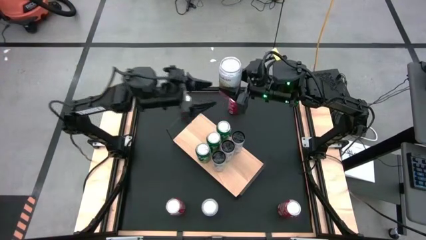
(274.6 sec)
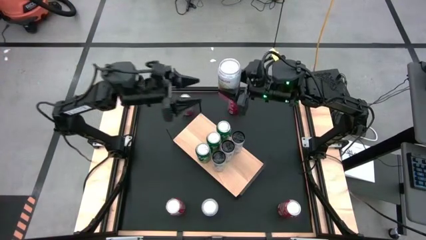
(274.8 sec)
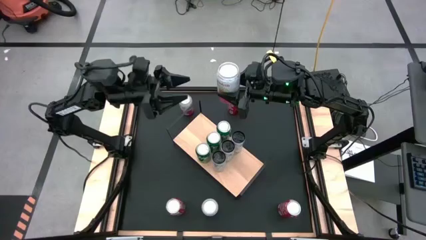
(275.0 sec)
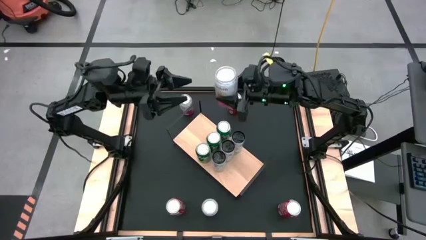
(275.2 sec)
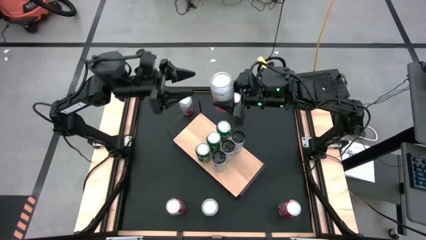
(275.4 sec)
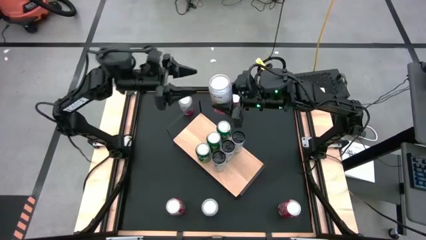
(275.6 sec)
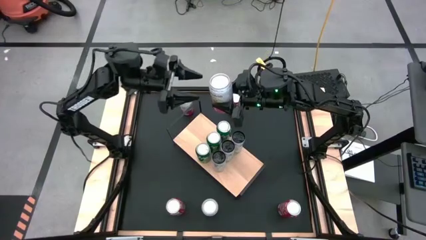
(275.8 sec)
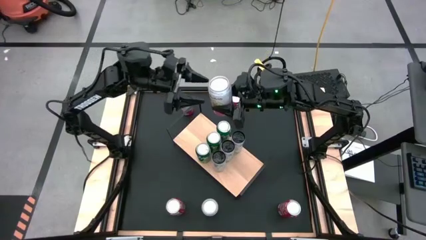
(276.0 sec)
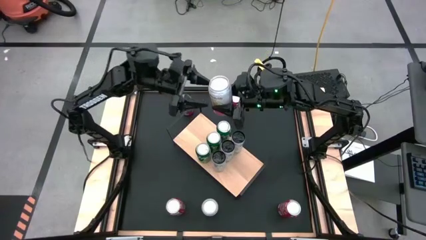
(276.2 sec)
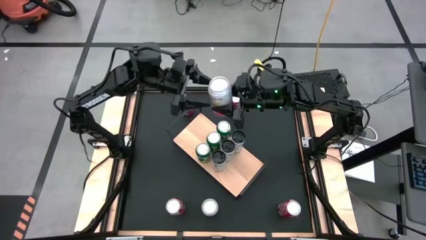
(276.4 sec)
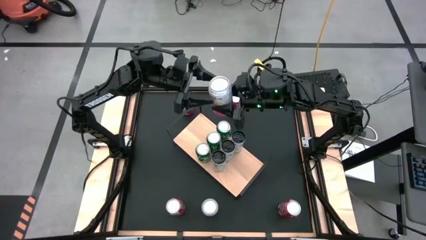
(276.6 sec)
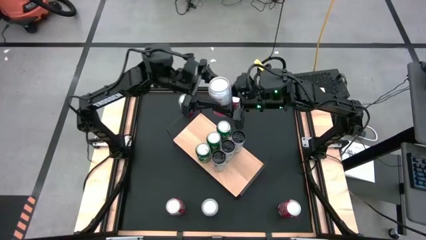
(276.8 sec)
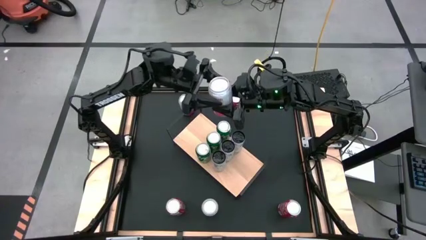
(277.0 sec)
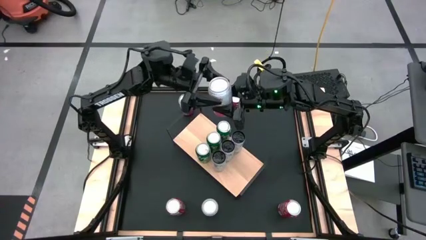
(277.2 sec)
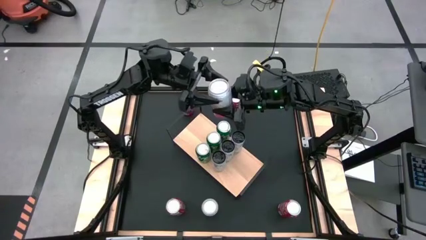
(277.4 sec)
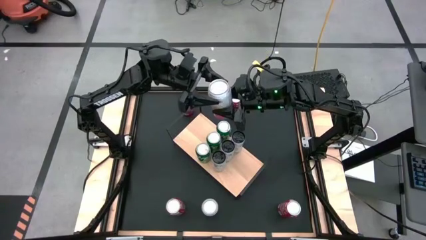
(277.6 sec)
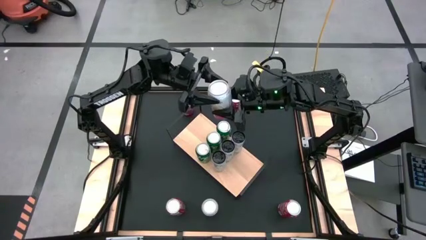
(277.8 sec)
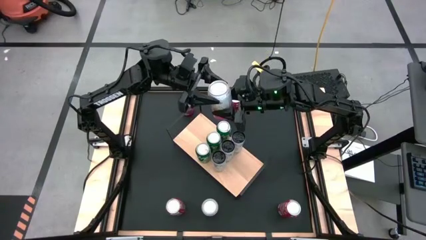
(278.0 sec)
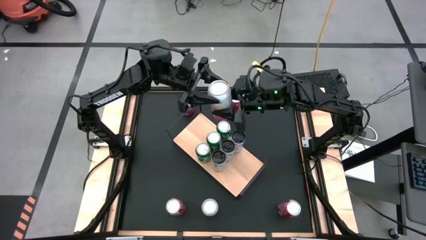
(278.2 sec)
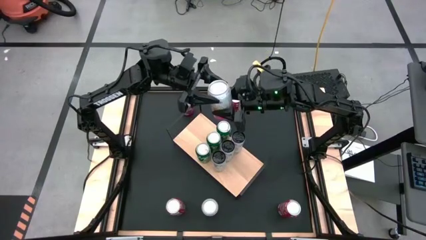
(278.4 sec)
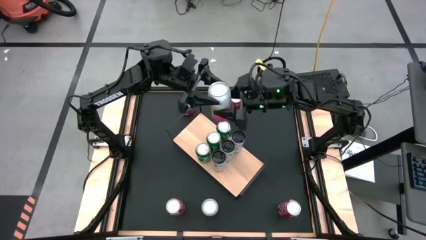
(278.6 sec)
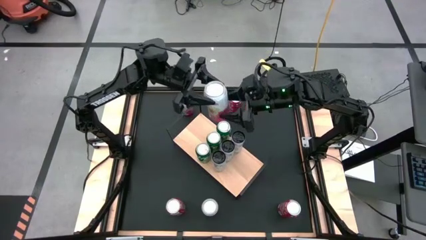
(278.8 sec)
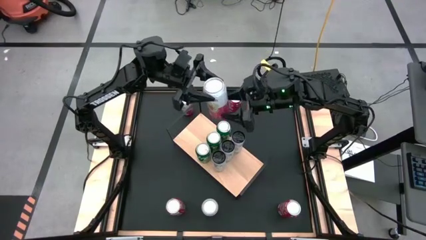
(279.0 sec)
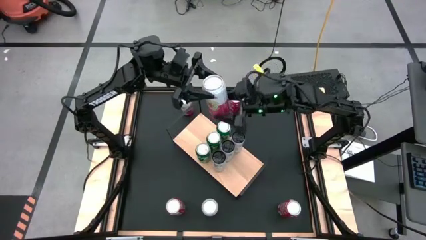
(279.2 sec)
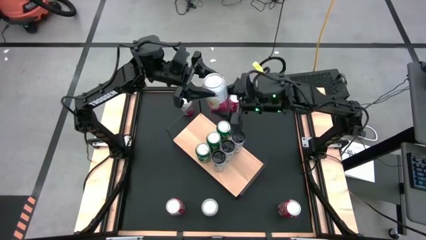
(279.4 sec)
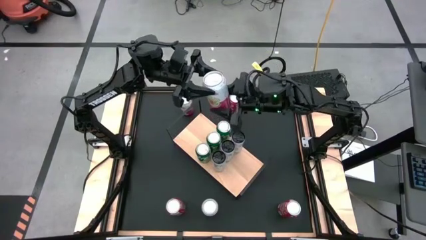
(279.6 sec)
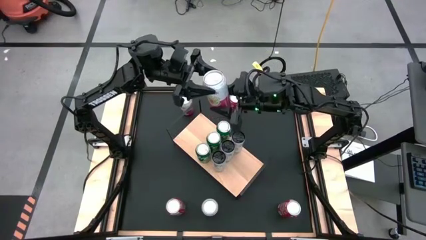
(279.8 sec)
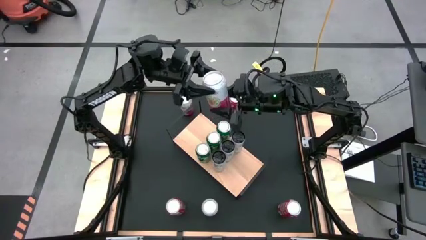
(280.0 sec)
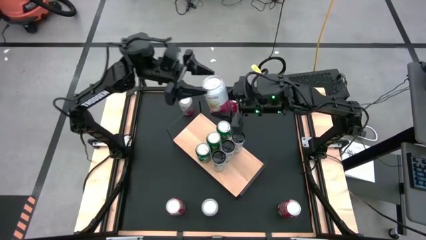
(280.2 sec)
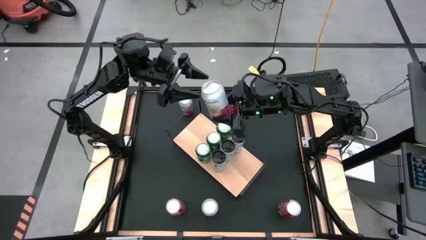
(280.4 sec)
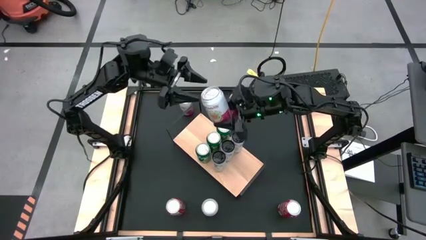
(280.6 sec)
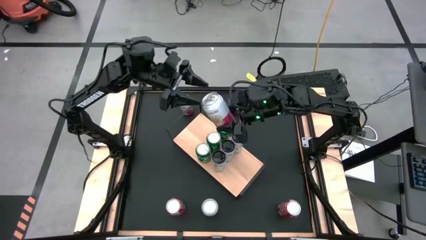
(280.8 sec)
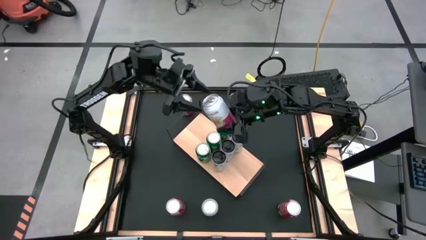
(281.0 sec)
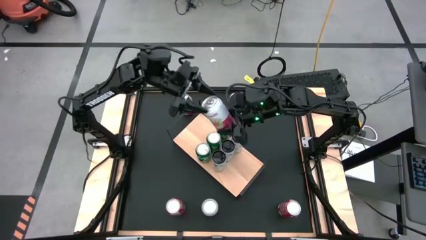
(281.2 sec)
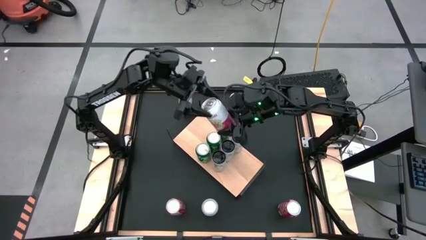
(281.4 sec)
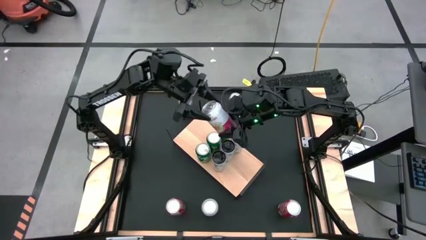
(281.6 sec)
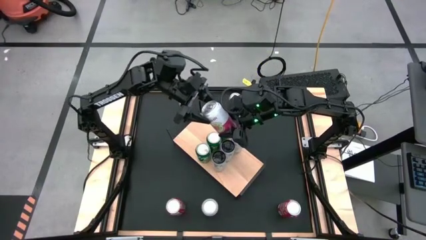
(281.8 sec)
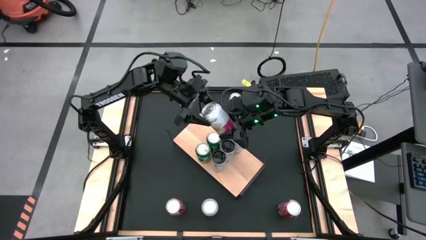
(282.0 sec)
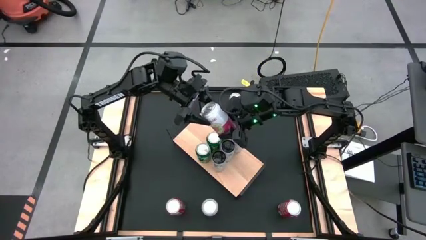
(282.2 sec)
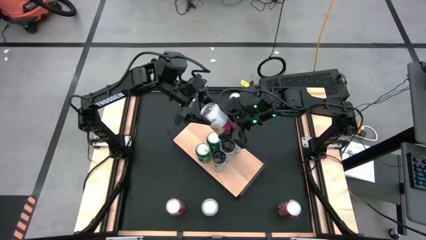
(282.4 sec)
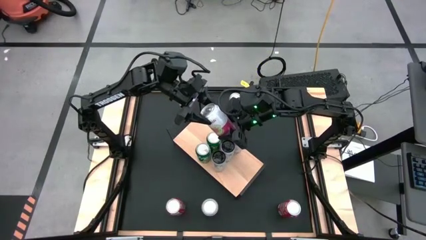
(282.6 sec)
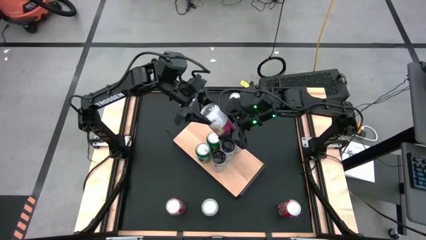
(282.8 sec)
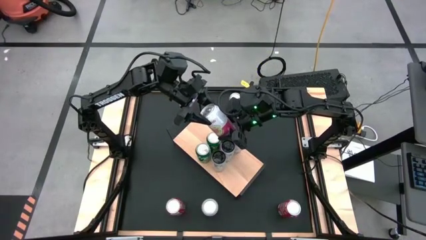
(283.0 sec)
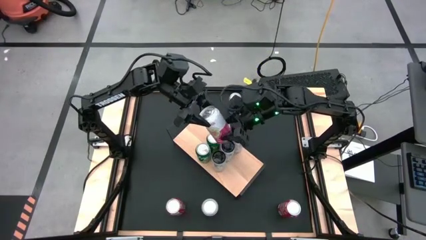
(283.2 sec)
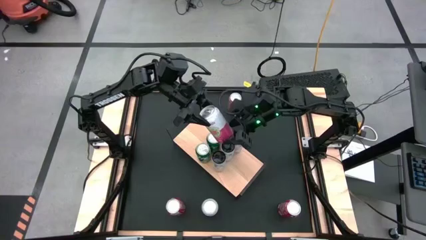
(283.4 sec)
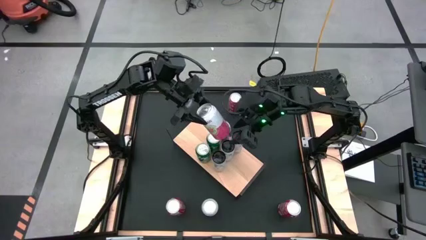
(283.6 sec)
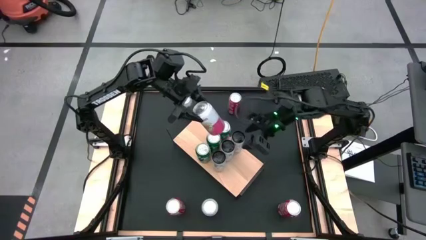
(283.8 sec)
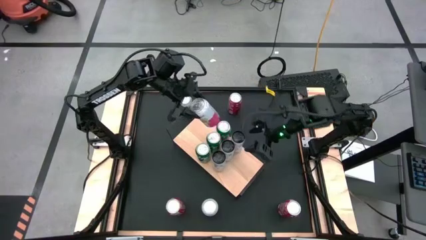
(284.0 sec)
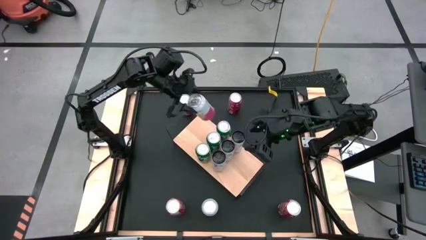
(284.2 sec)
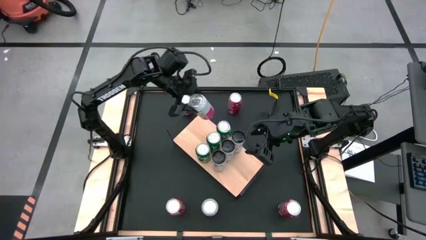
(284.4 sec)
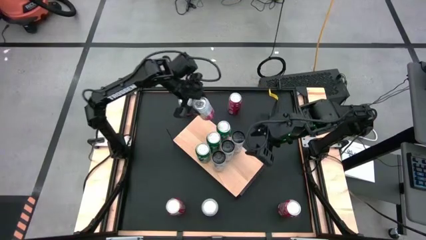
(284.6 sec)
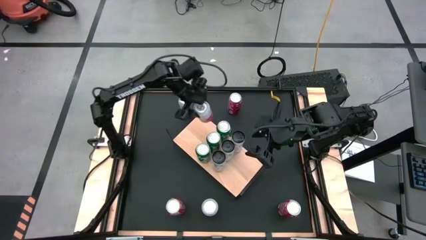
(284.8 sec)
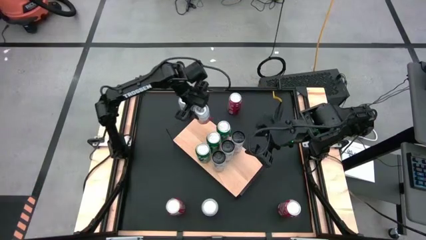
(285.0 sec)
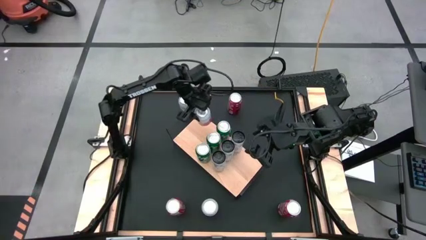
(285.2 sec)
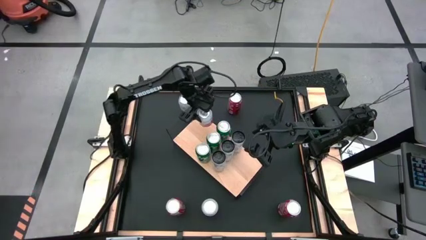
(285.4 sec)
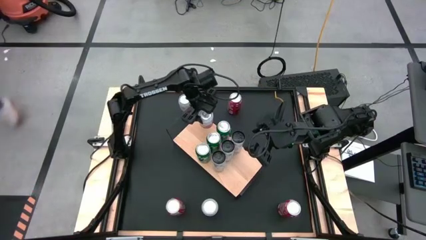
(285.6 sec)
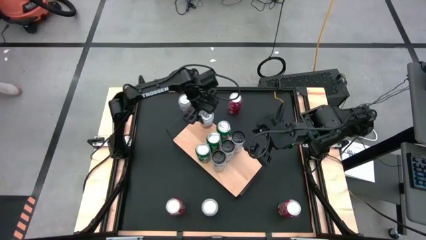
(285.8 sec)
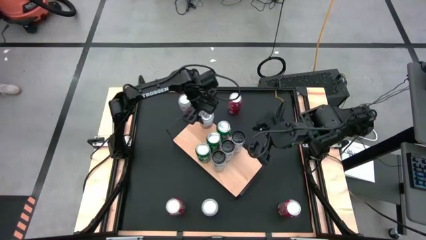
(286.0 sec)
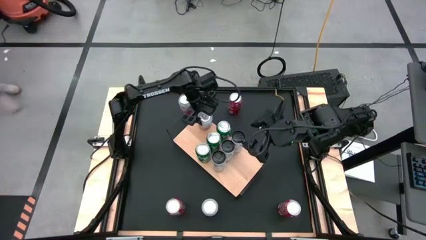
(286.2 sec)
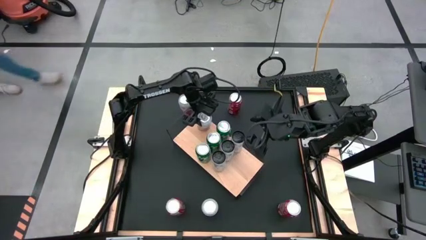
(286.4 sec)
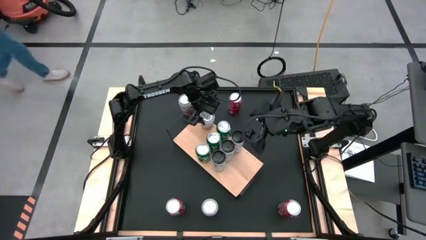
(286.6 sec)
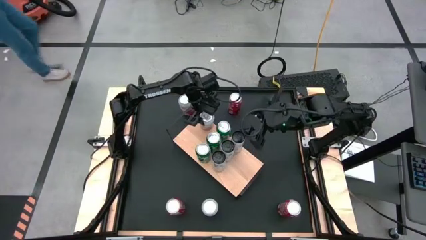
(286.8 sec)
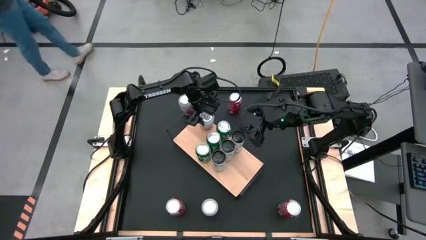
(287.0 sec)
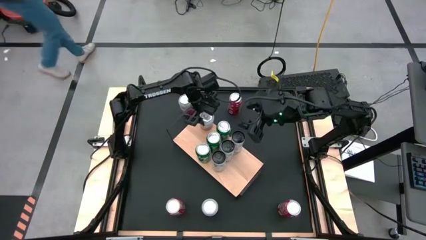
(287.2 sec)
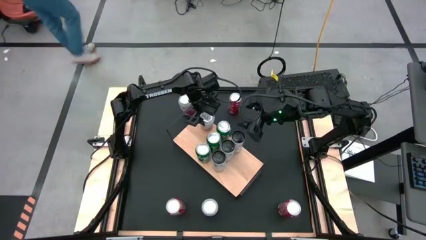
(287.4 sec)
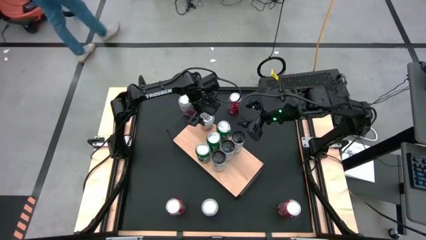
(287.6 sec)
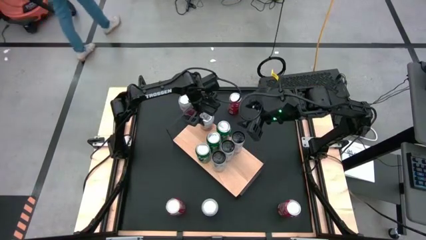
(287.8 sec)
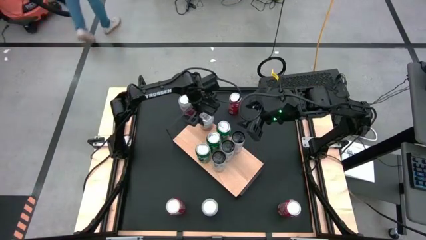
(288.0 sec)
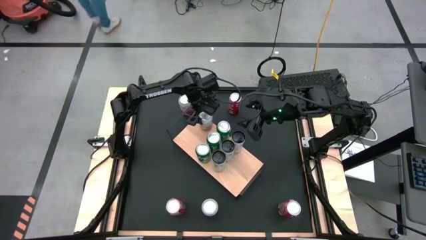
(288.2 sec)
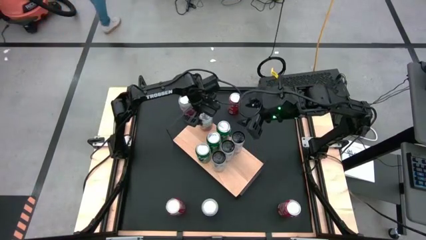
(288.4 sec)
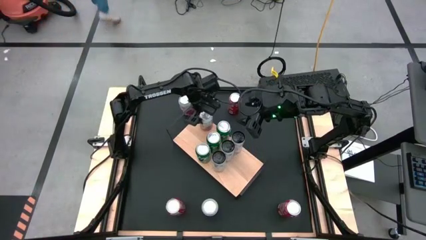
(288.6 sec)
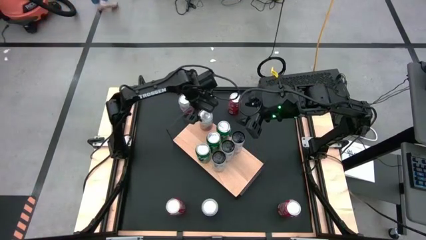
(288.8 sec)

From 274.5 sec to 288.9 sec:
Task: Place canned beverage on shelf
Put the top right white and pink soda can on the shelf
